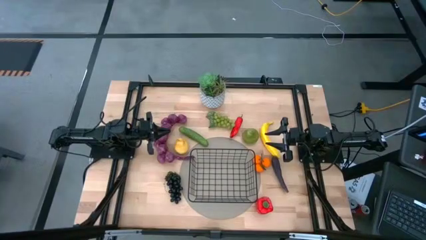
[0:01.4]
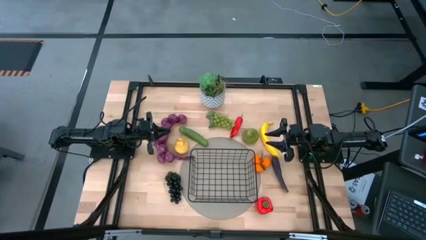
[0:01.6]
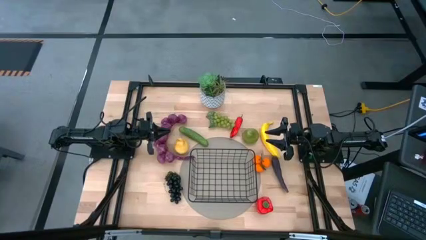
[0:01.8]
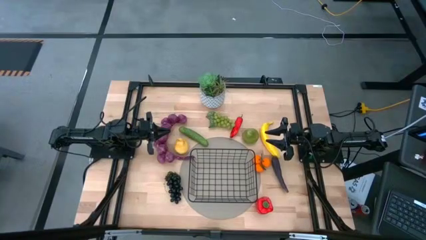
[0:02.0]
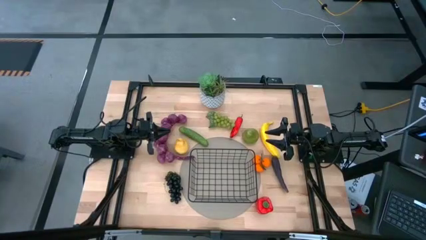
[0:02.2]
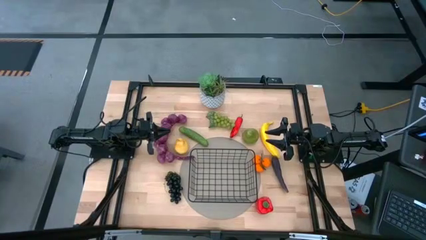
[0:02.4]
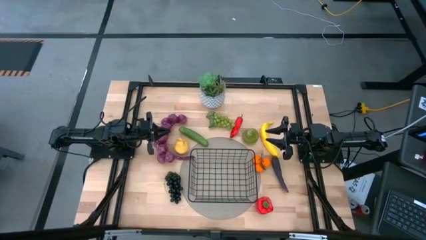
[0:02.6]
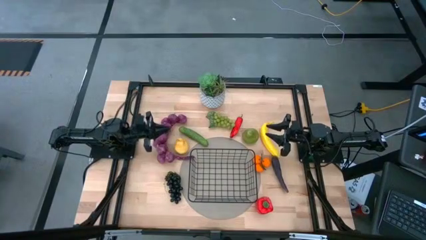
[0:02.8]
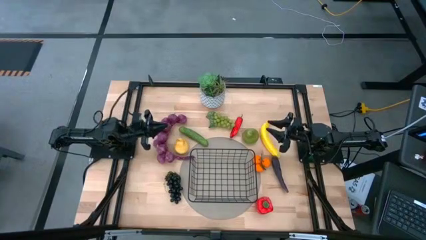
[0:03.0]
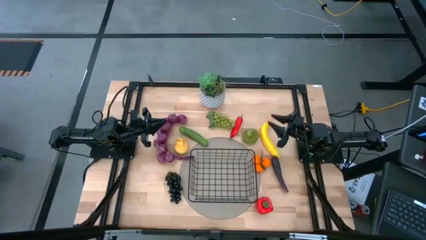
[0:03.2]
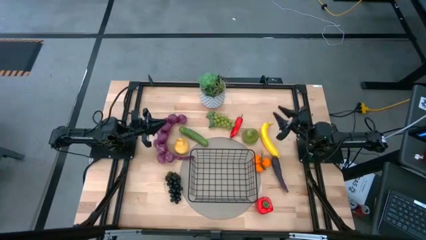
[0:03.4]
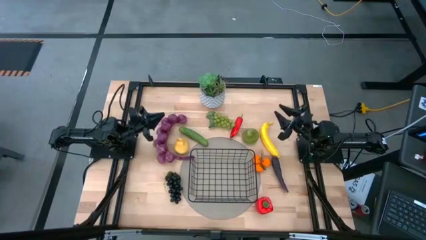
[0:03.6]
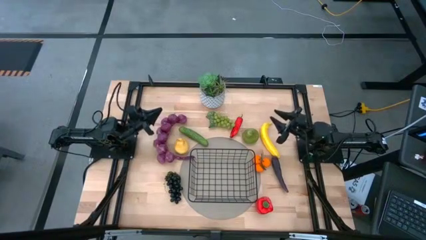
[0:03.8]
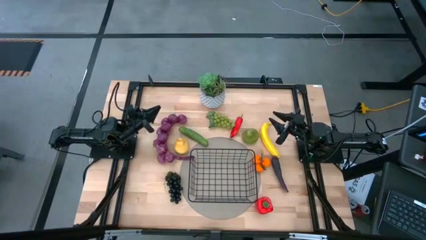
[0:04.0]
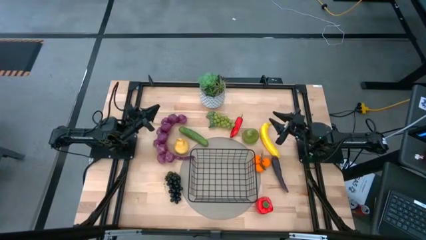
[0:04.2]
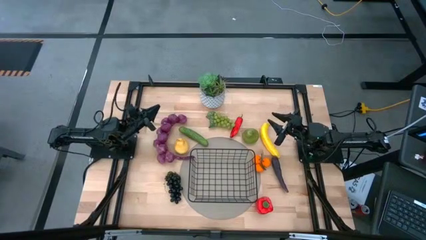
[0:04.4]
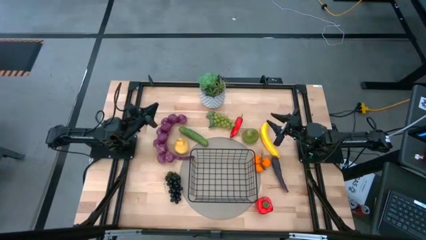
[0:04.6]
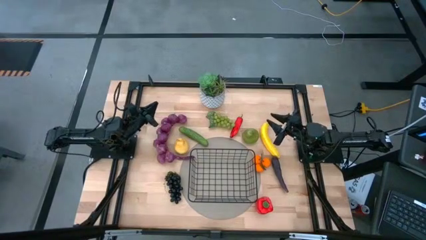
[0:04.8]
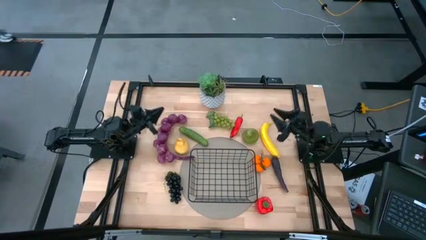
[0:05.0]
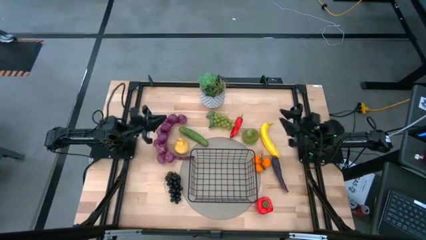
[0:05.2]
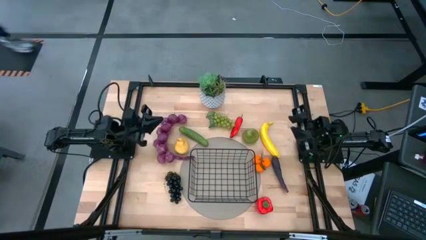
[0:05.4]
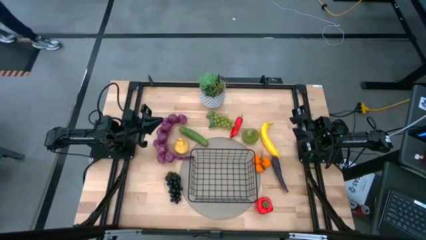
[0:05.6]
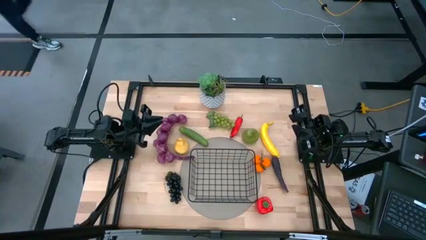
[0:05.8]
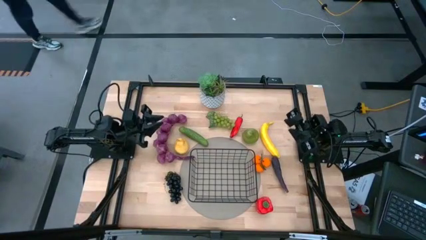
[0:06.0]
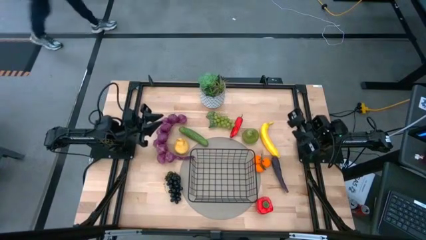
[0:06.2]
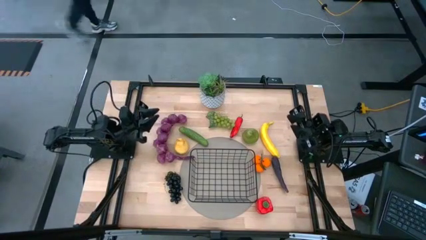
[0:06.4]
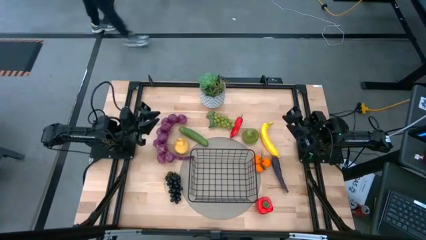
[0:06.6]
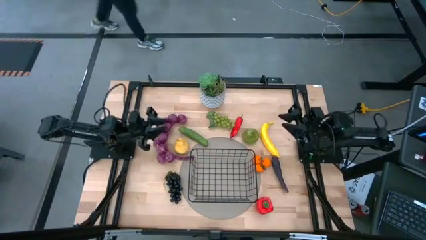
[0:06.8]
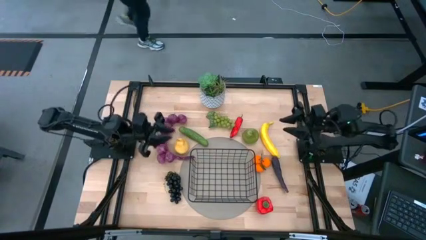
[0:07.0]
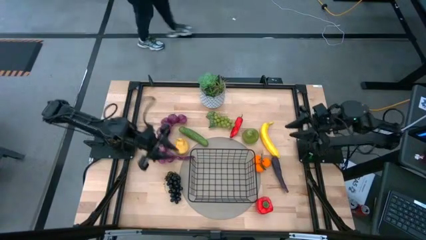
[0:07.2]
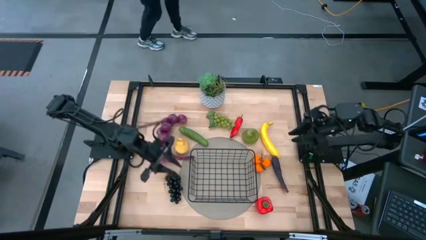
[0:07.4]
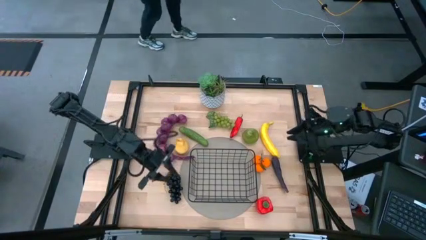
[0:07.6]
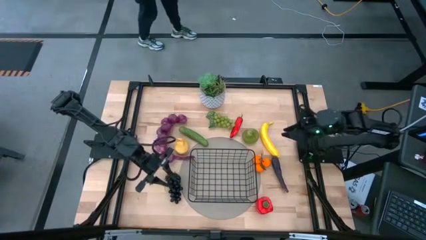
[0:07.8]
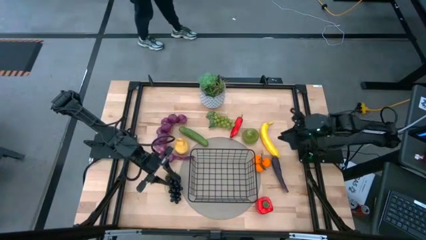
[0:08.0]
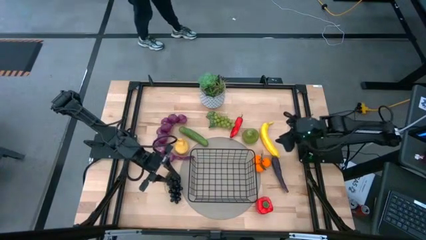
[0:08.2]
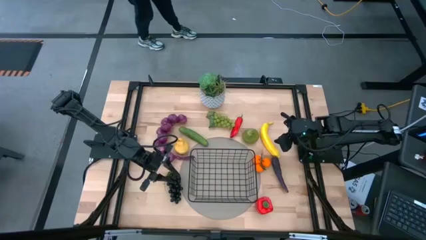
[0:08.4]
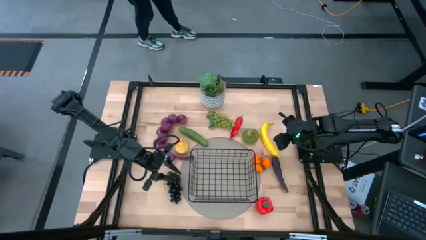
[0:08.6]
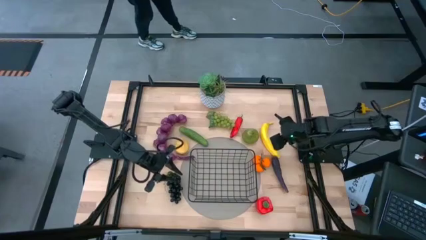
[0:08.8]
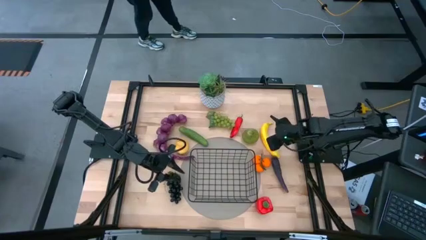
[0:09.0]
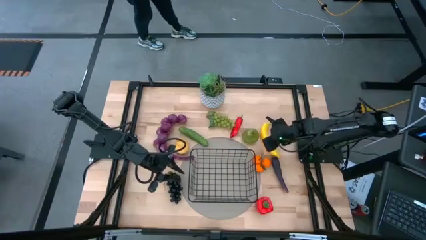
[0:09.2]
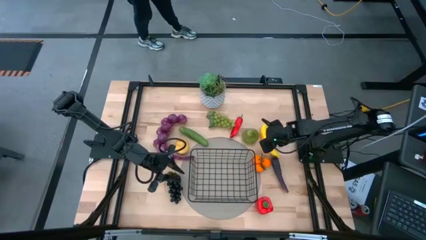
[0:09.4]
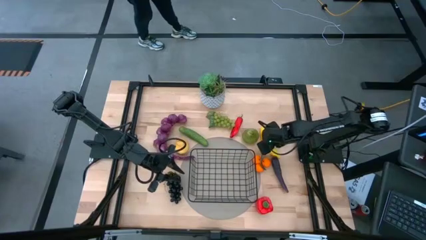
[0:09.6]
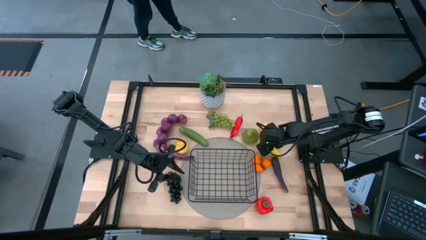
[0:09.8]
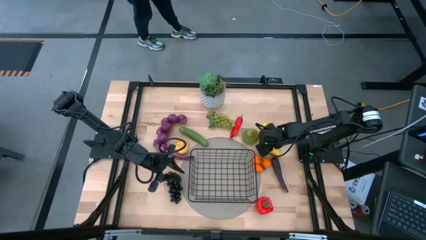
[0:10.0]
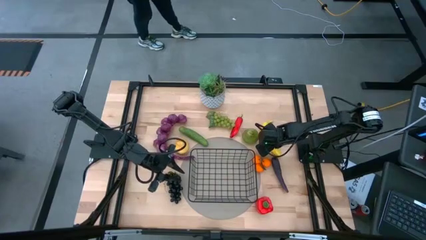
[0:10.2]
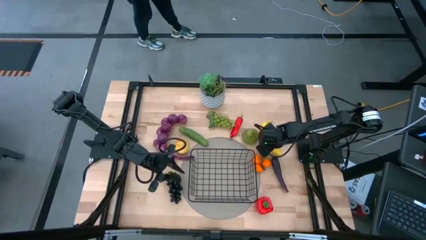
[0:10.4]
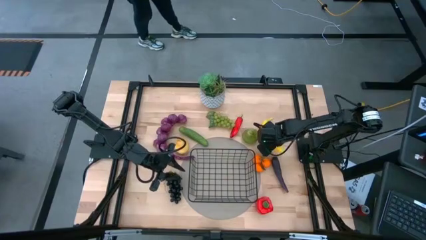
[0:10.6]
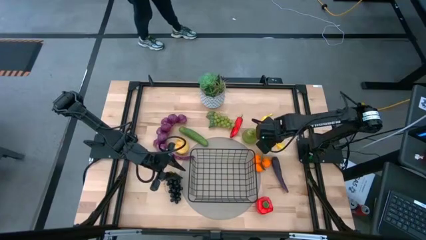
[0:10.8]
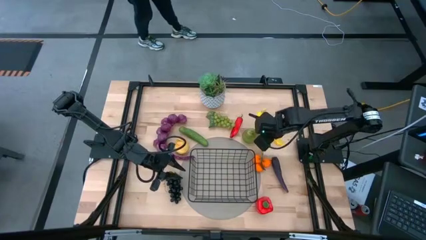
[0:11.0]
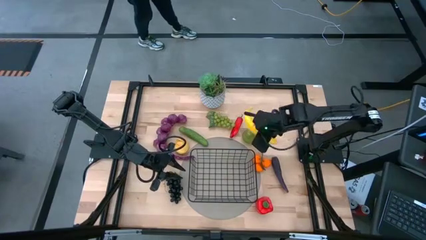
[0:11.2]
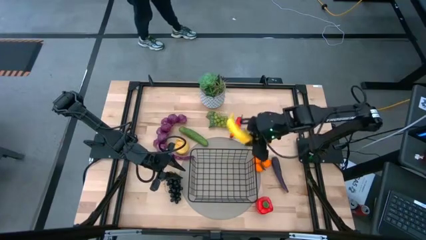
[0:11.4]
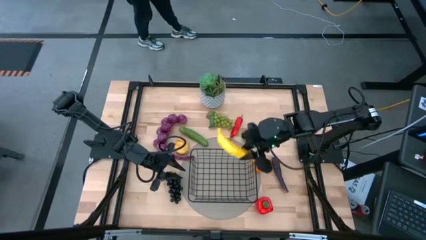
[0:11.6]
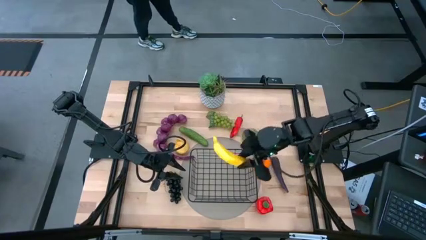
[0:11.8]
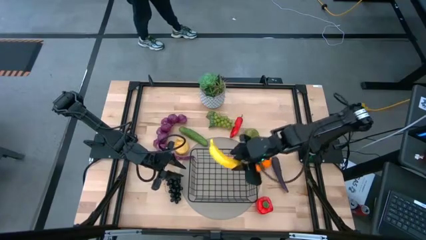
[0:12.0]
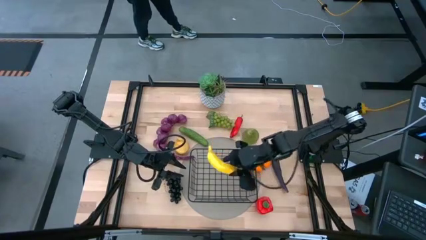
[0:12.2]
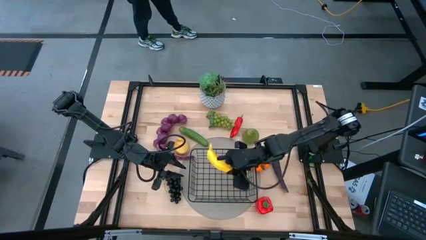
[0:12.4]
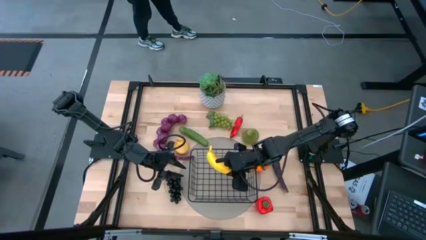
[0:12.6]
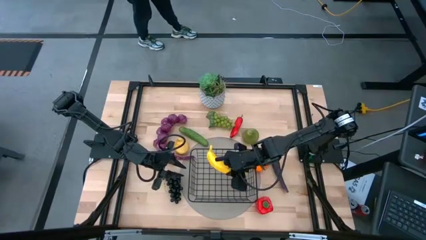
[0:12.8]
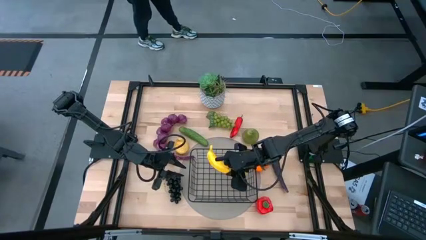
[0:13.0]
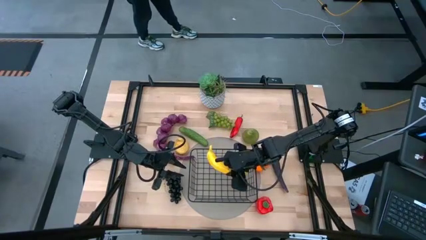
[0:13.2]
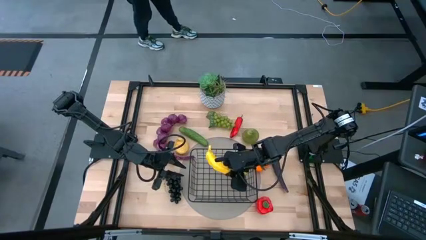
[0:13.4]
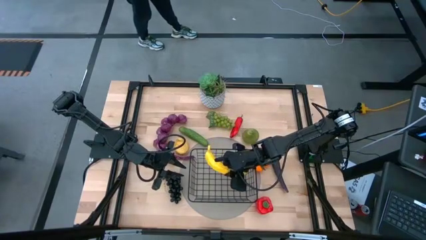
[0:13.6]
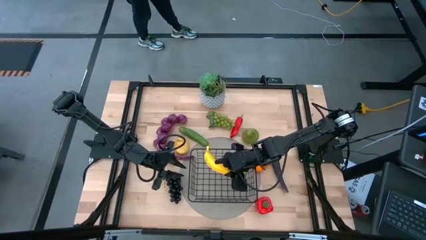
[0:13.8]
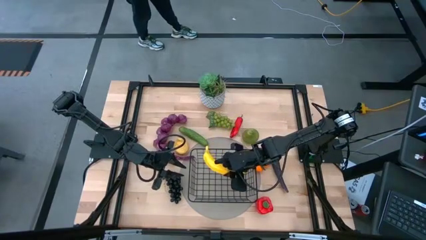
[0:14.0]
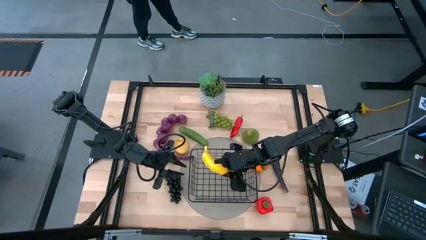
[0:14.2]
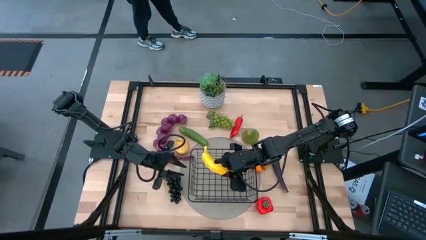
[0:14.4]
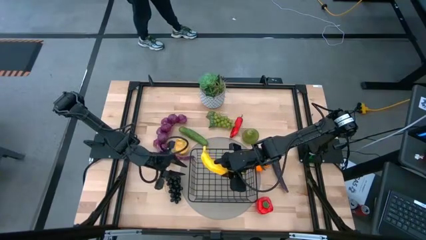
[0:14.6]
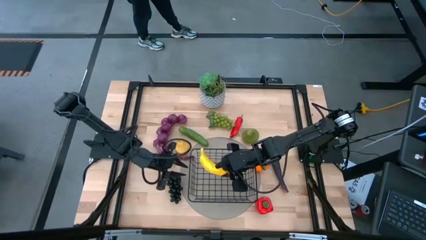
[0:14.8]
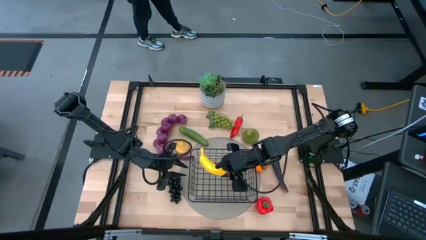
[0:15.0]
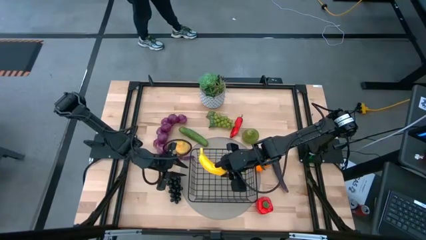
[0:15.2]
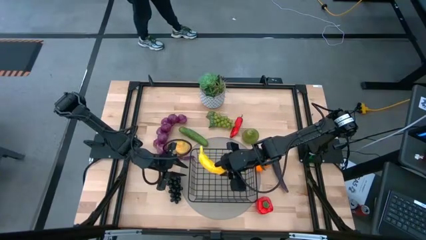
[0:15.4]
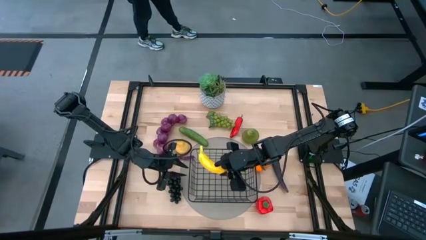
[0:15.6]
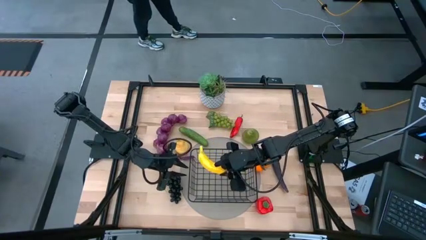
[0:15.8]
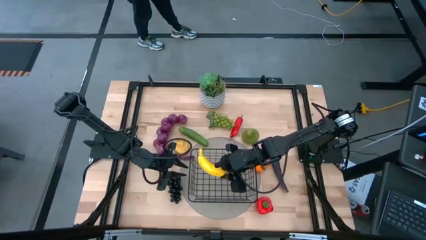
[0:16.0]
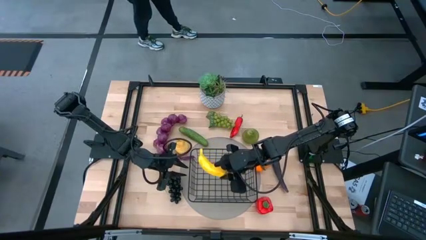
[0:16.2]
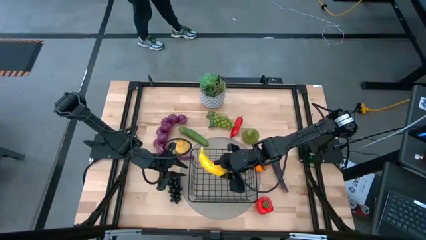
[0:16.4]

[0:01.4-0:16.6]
Task: Build produce basket
Put the yellow banana into the black wire basket
